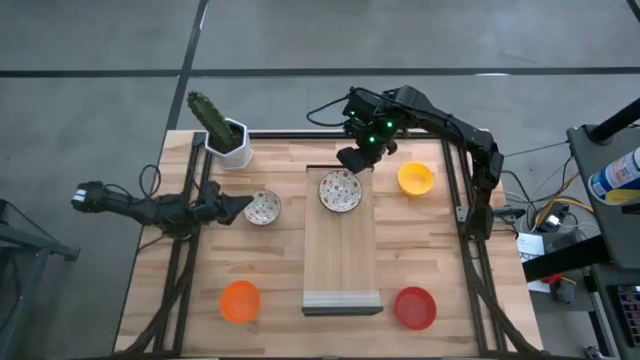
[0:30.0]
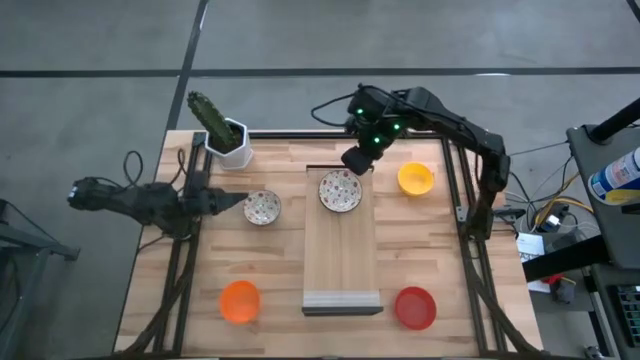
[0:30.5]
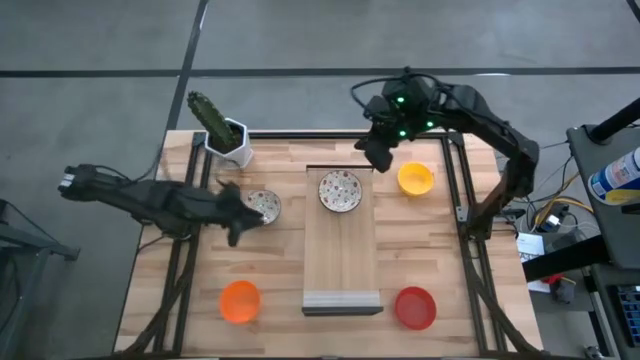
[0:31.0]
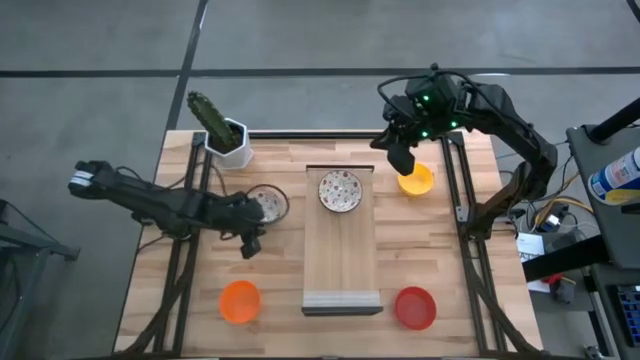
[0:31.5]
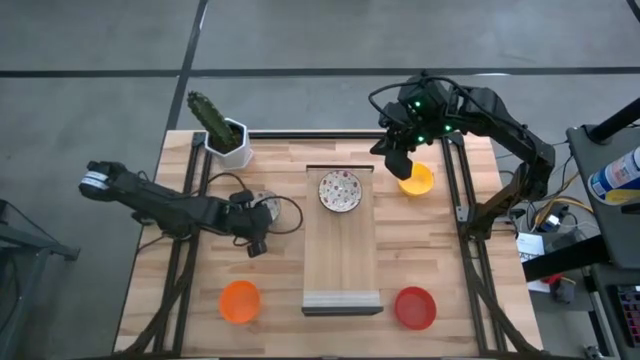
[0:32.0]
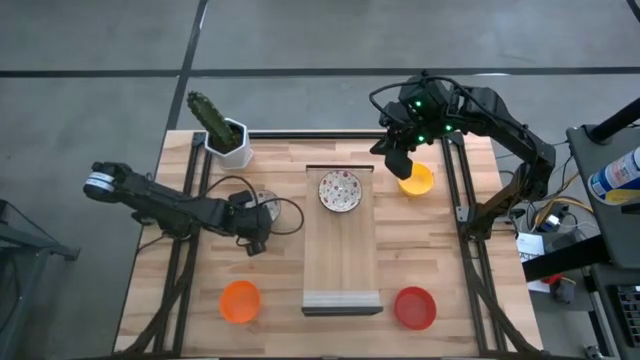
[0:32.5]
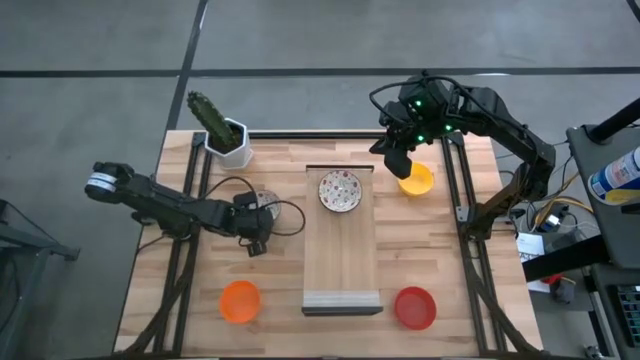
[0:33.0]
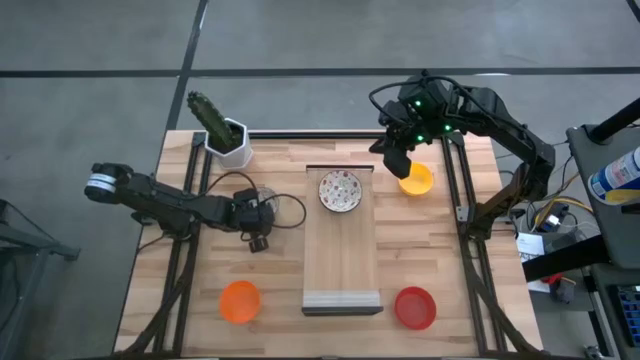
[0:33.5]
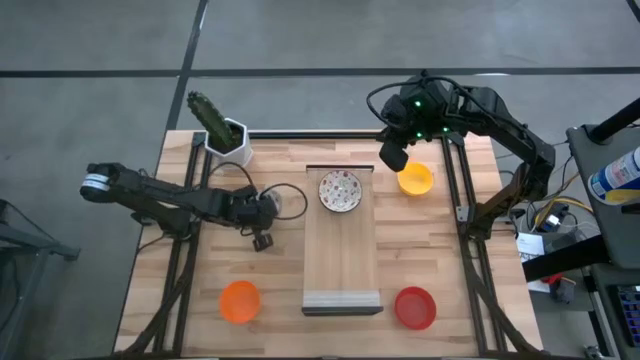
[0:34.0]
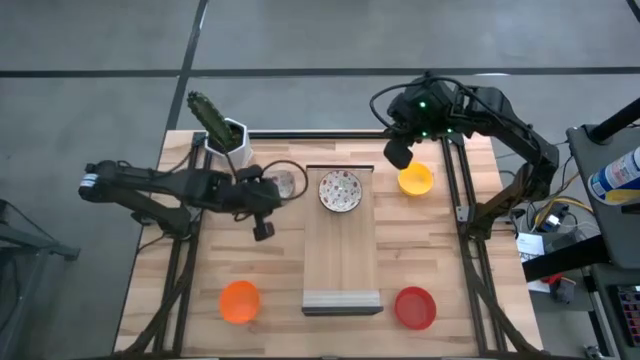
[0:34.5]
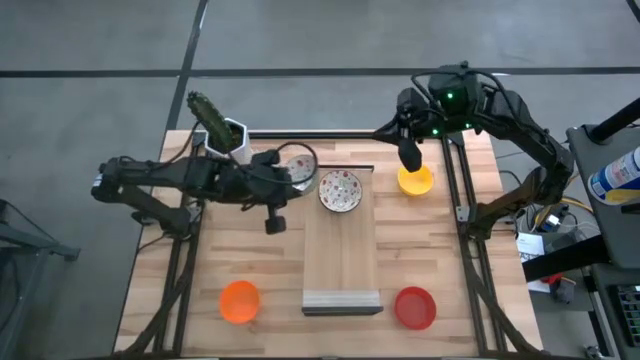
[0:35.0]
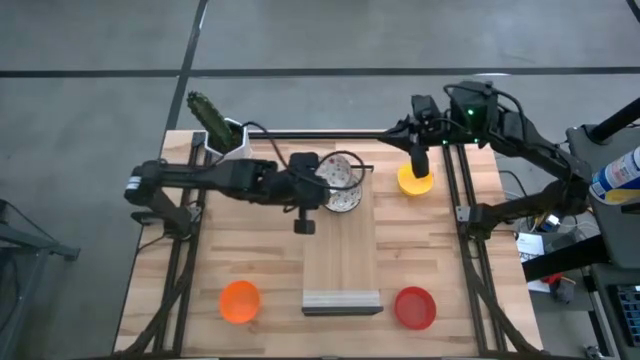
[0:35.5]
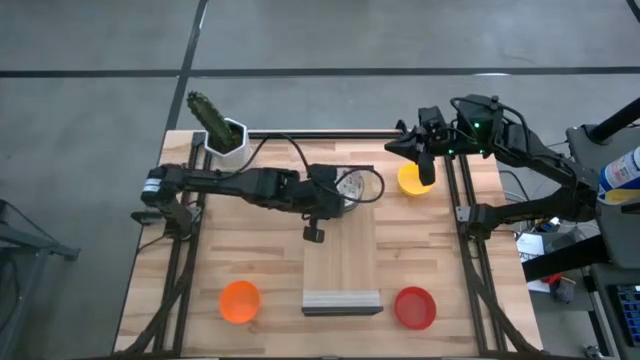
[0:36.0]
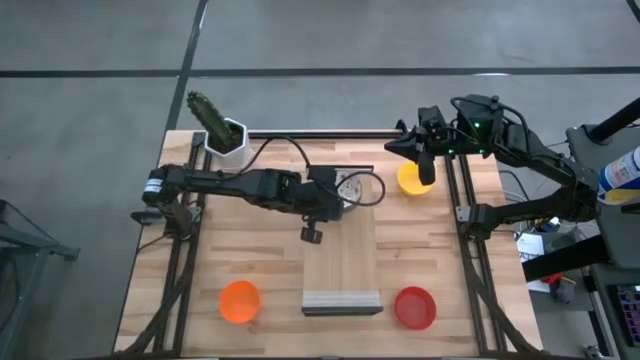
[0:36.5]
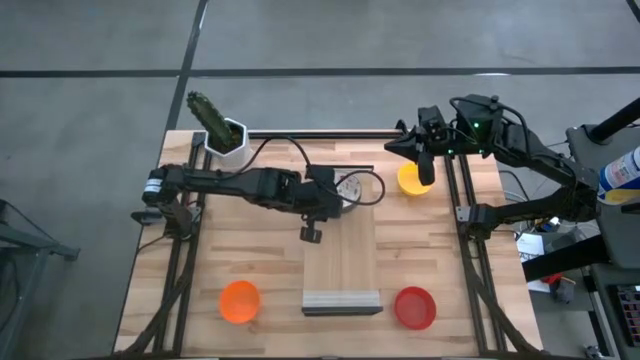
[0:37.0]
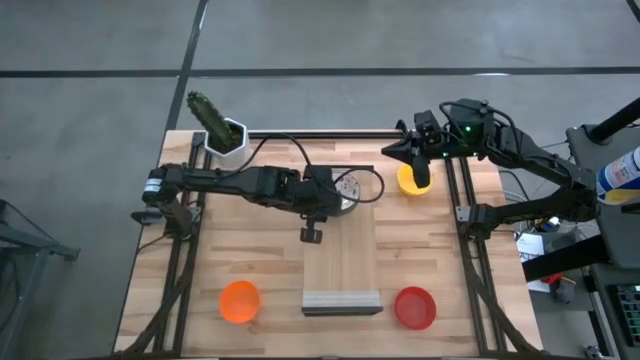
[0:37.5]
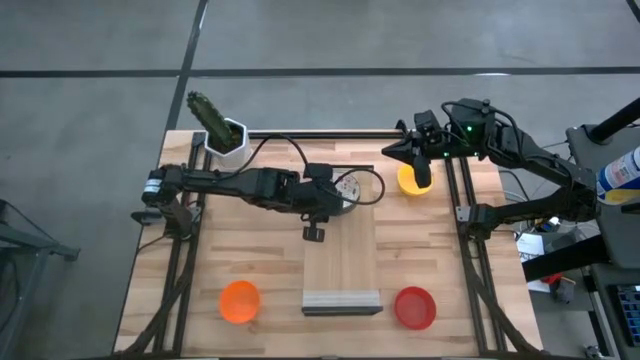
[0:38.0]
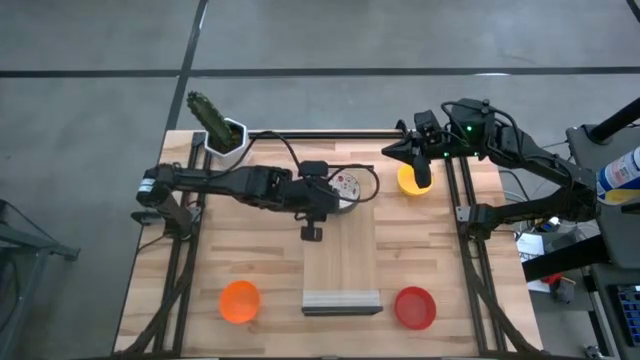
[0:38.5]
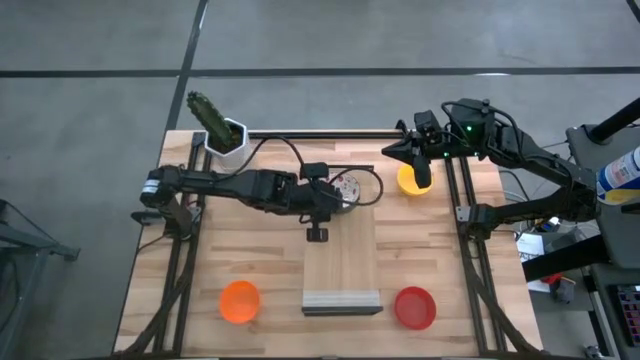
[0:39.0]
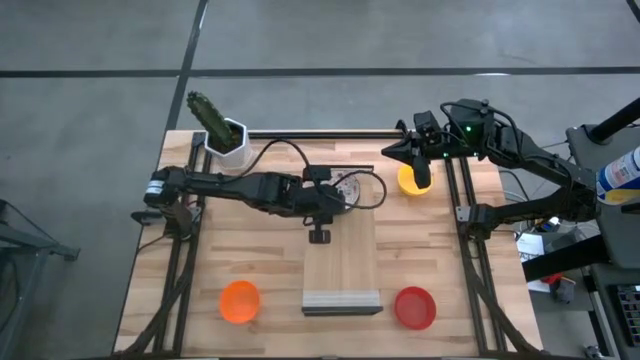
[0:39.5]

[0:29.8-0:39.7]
Task: Pick & Place Mini bowls
Stack the white bowl on top of the white bowl on the shelf

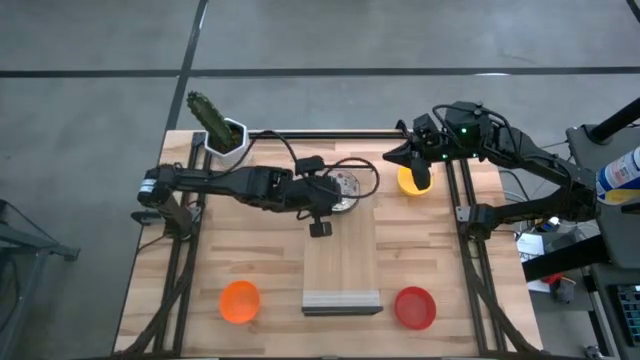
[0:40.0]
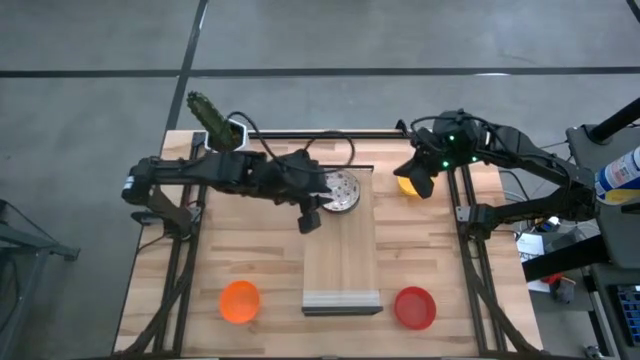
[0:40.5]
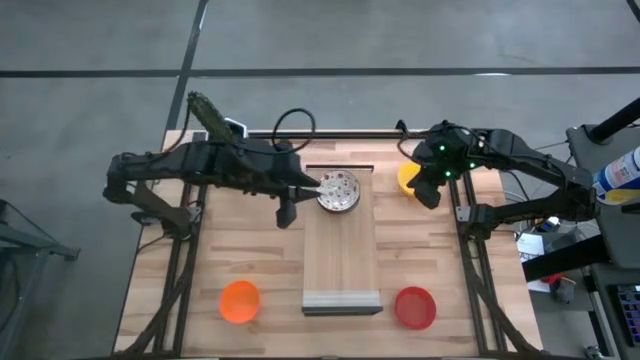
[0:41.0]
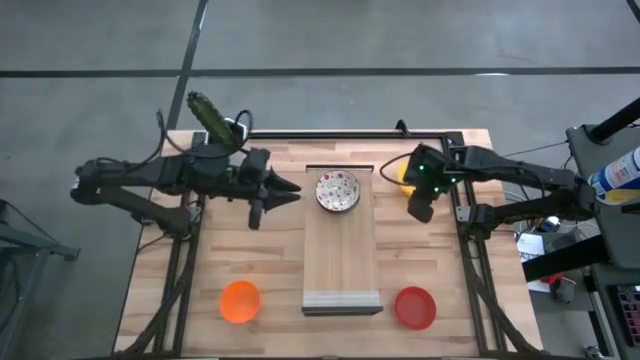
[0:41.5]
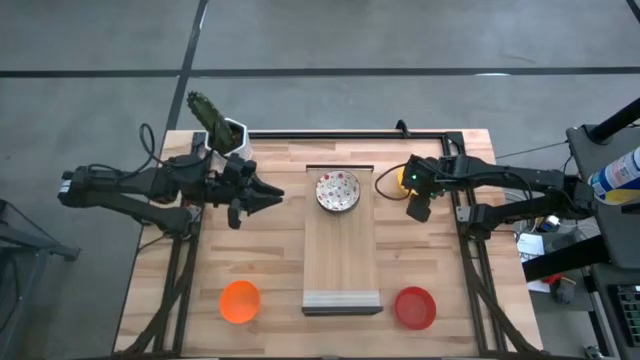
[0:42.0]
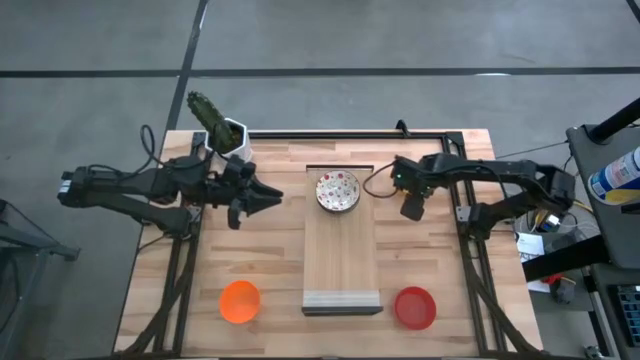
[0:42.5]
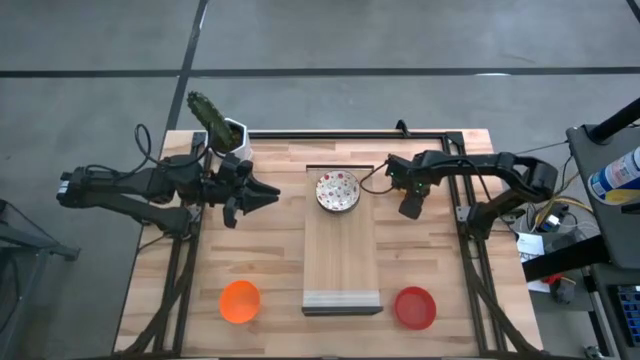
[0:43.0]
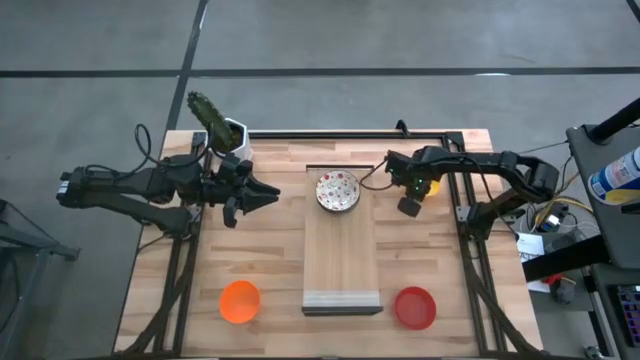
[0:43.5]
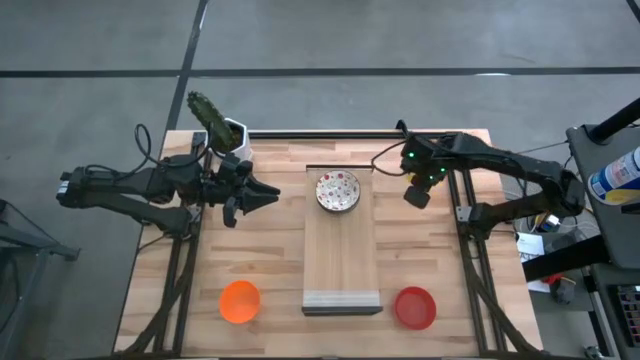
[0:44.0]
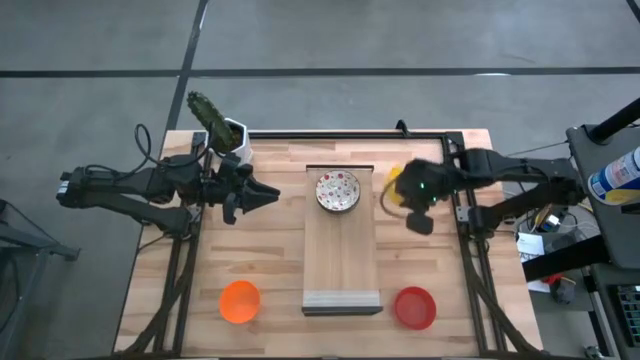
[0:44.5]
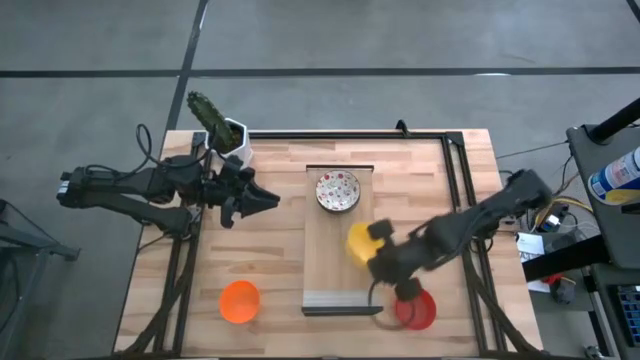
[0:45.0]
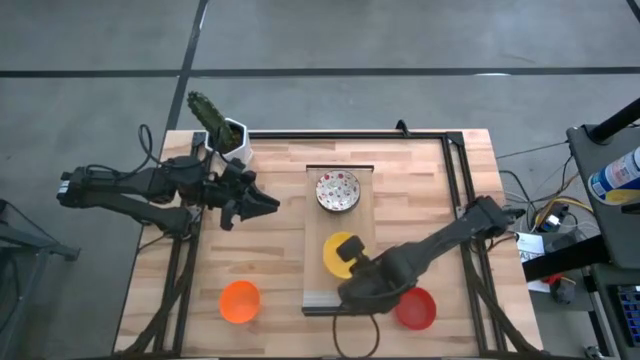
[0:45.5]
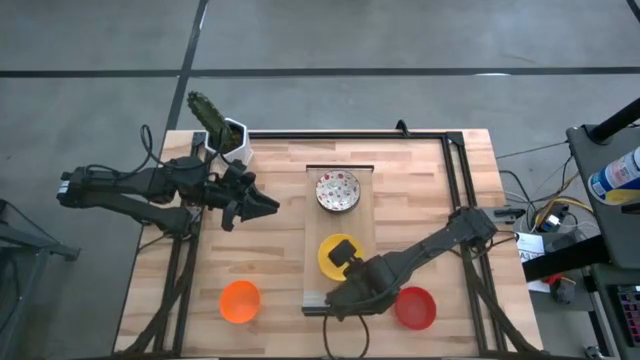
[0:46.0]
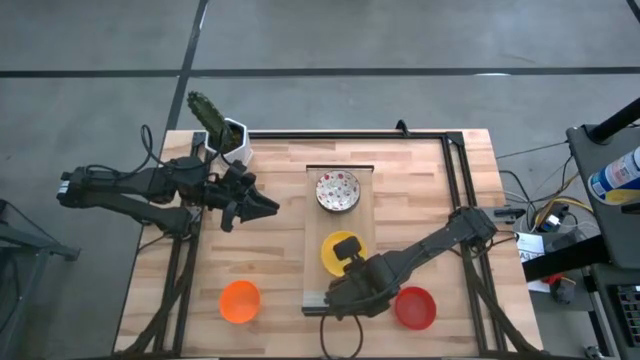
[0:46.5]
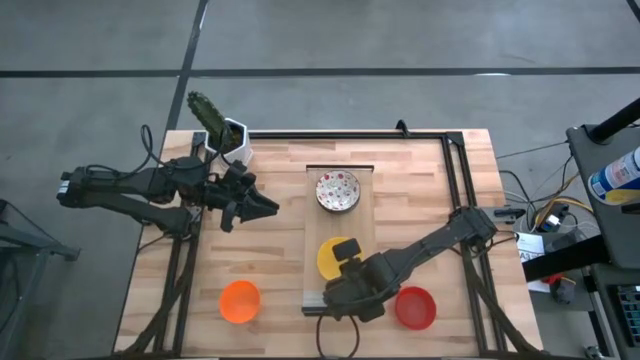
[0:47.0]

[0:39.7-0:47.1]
Put the yellow bowl on the shelf

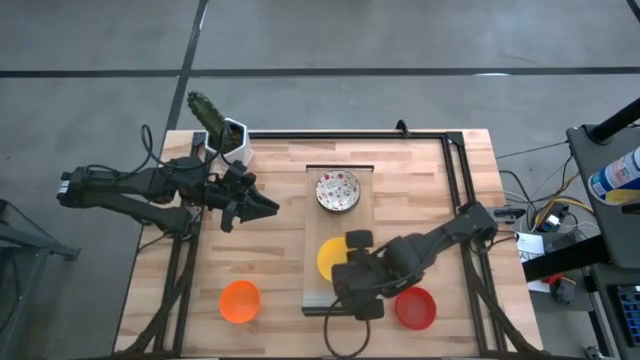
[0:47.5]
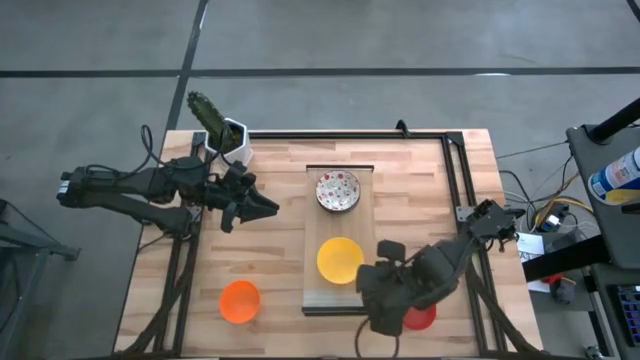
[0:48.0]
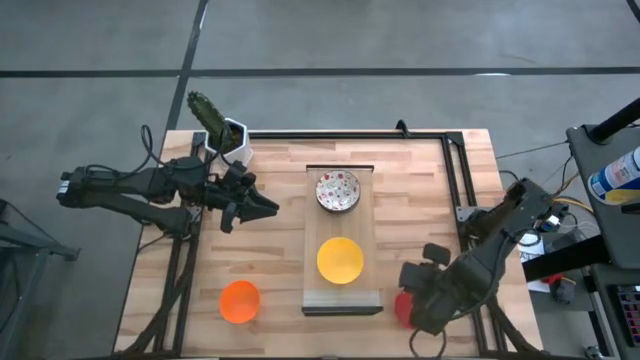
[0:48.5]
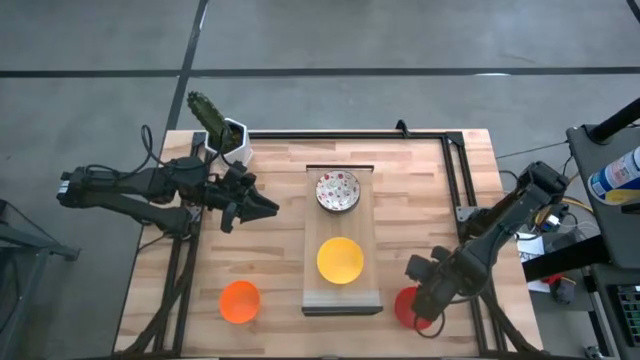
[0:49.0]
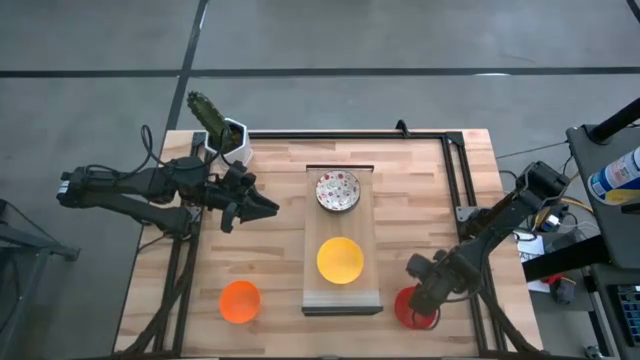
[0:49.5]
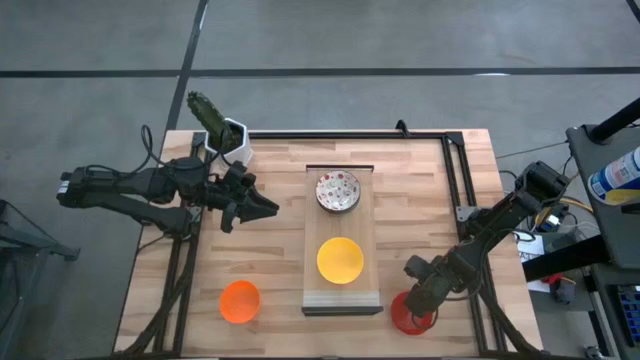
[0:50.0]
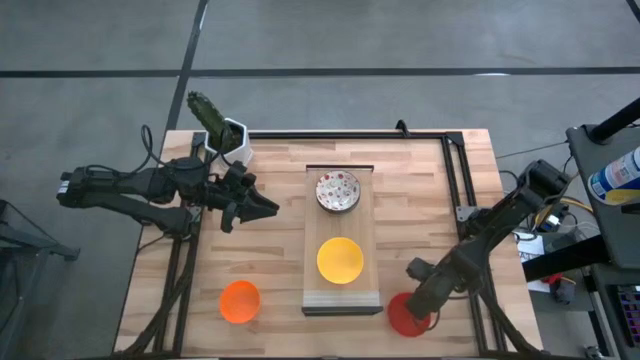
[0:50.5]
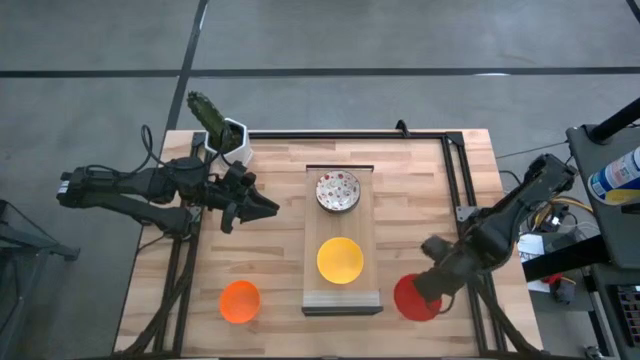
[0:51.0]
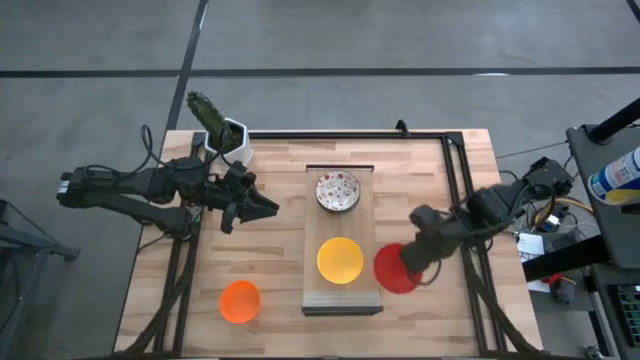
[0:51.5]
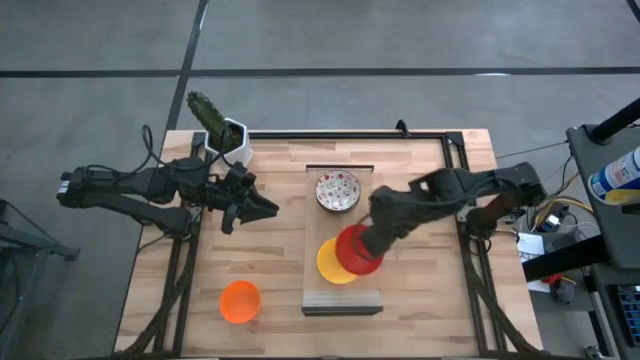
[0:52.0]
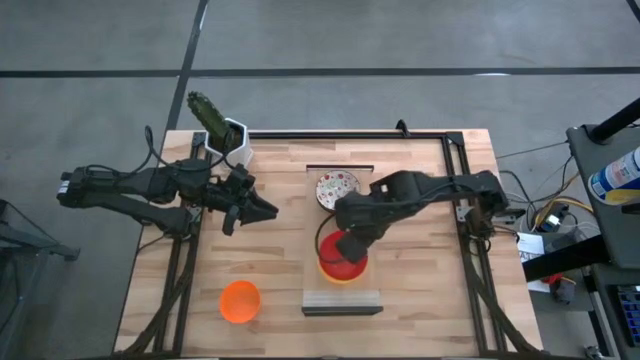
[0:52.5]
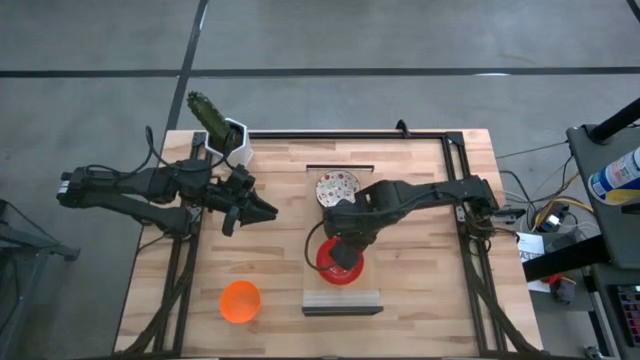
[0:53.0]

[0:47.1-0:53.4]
Stack the red bowl on top of the yellow bowl on the shelf
